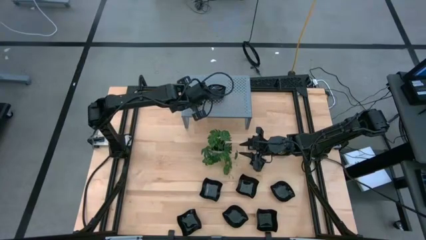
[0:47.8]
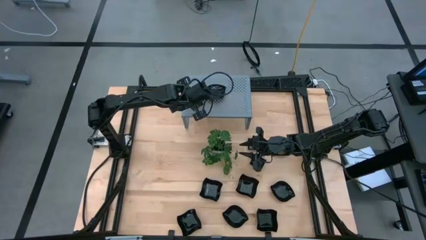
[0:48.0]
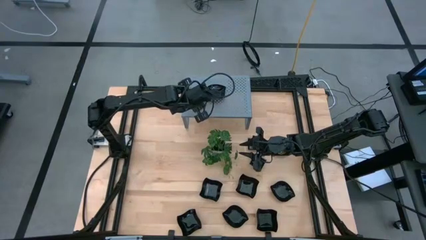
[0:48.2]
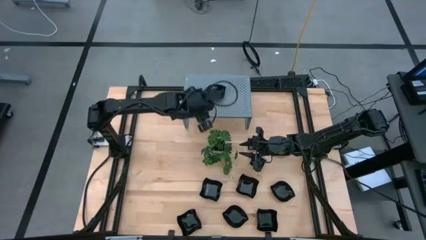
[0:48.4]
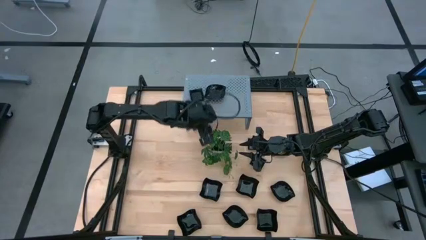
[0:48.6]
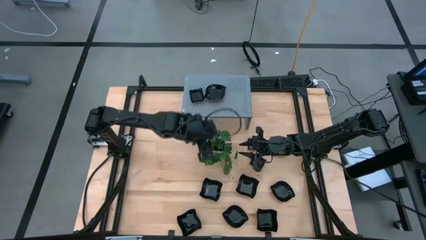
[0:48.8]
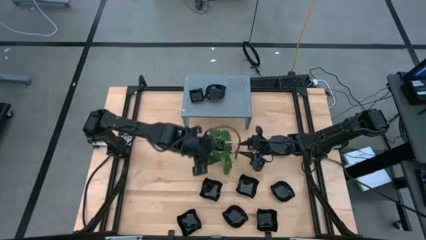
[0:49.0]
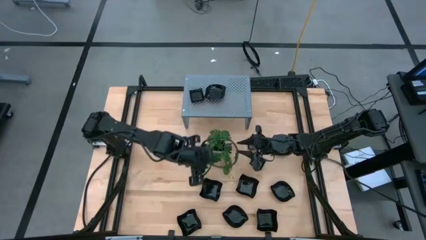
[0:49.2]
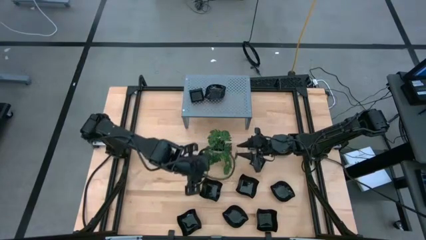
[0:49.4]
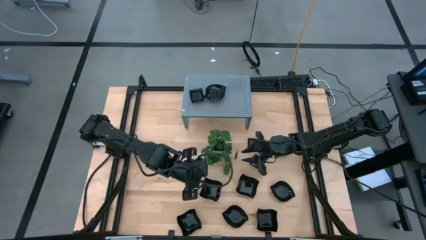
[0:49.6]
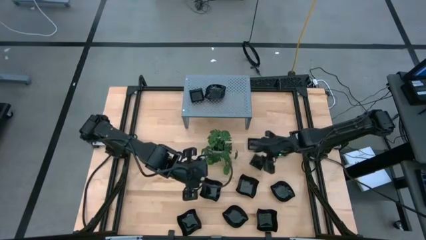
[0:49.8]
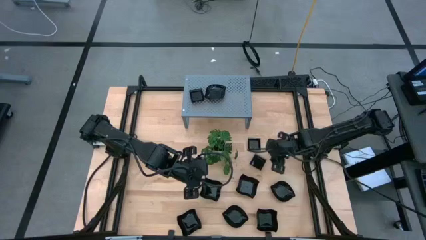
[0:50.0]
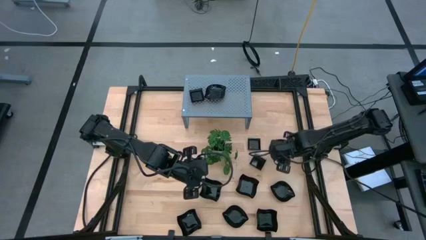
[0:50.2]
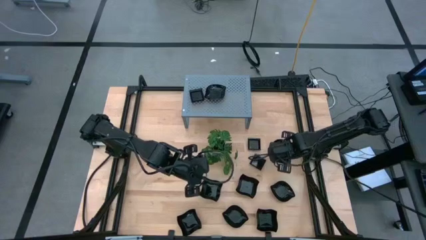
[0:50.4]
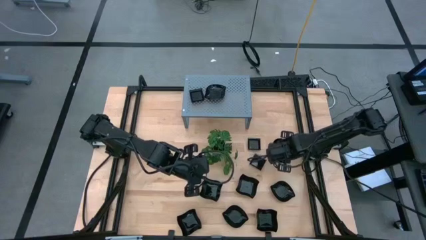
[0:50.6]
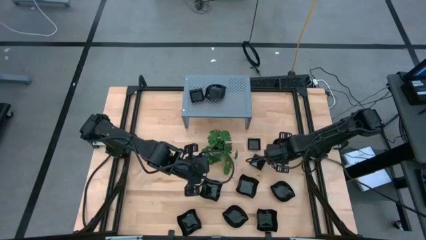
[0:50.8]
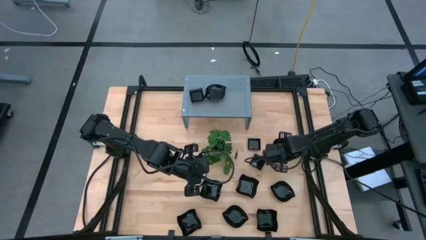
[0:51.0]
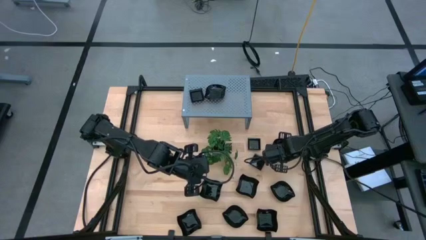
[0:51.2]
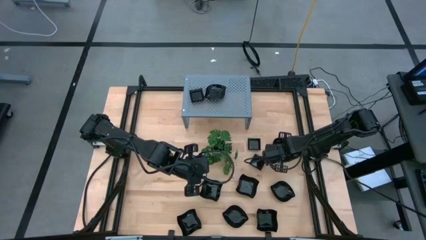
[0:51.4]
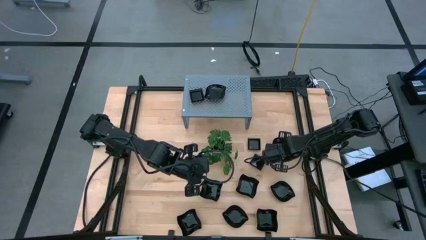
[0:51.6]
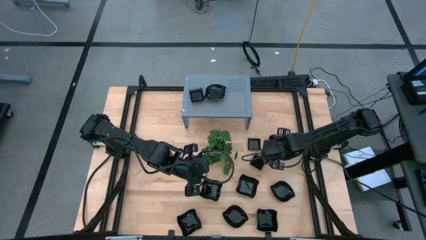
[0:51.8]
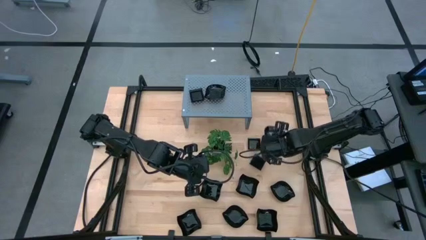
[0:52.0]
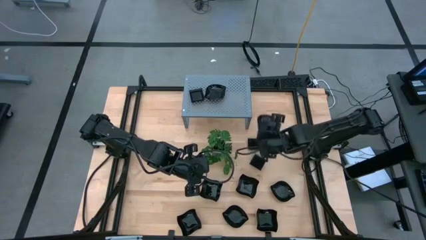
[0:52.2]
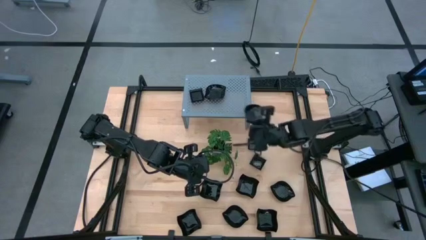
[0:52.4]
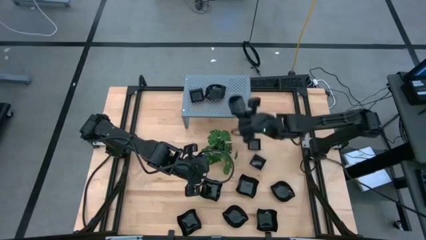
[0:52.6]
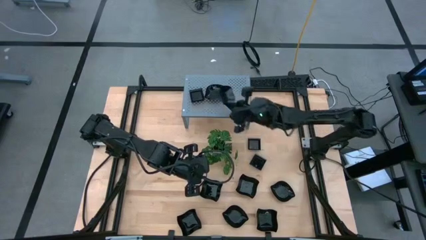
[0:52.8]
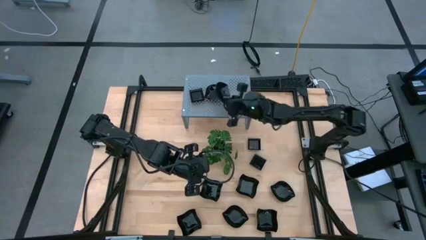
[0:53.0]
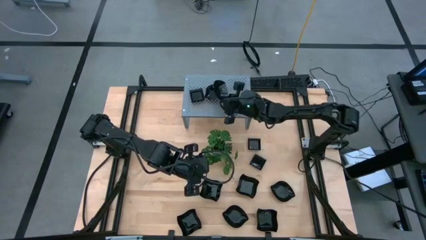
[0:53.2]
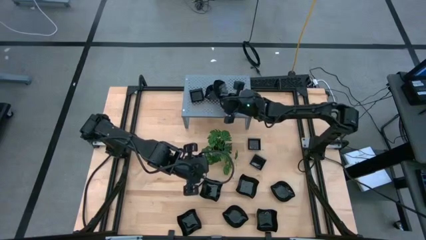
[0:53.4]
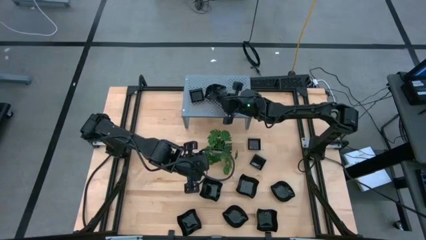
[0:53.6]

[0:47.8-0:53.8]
Task: Pick & Place Mini shaped plates
Stack the leaf shaped plate on top of the other black leaf shaped plate on the shelf

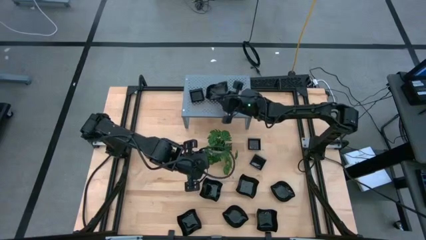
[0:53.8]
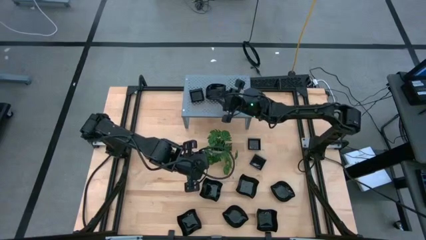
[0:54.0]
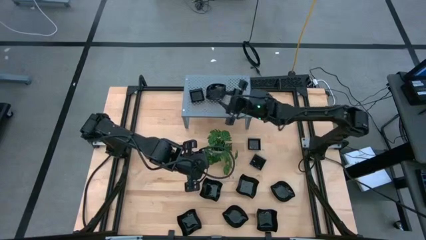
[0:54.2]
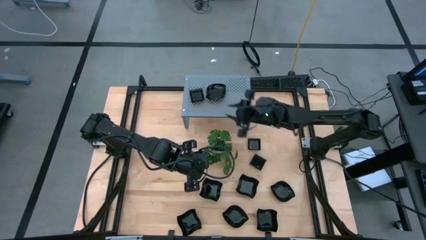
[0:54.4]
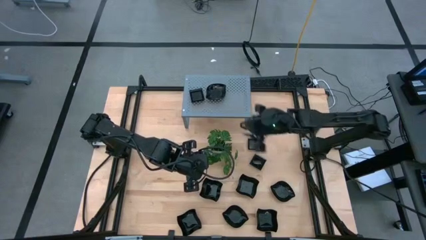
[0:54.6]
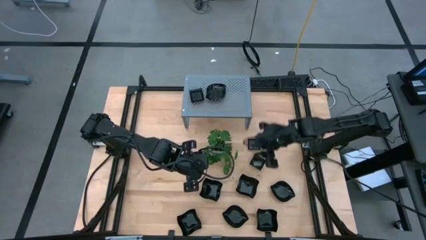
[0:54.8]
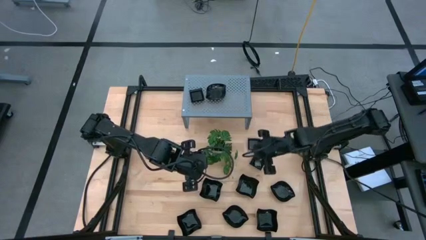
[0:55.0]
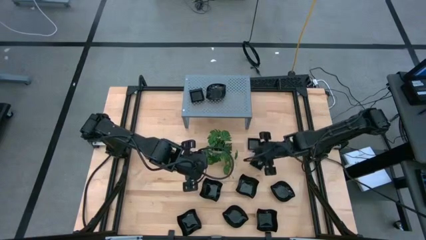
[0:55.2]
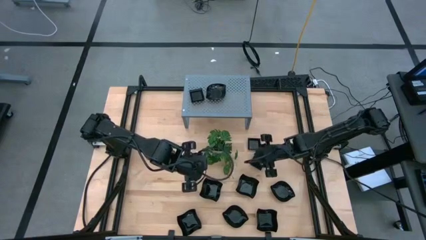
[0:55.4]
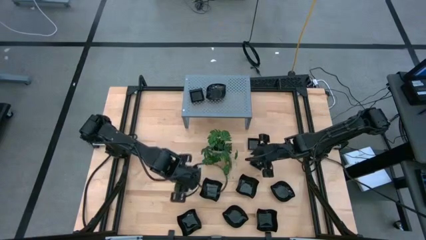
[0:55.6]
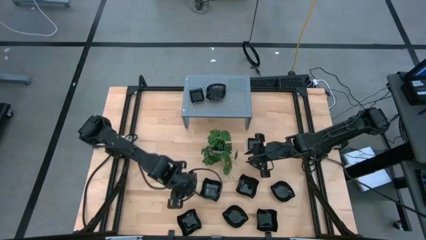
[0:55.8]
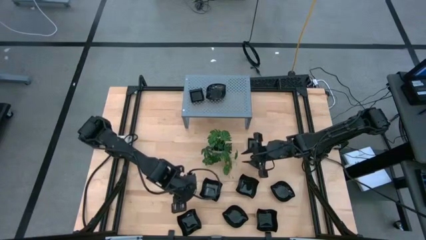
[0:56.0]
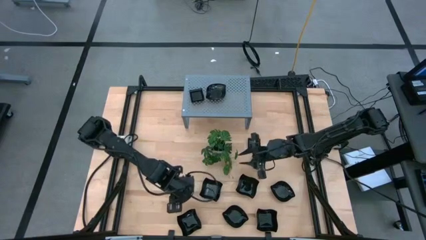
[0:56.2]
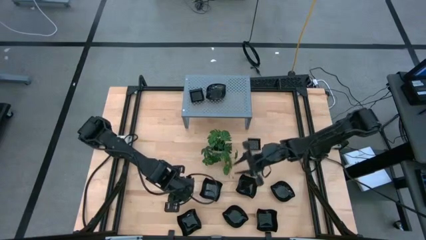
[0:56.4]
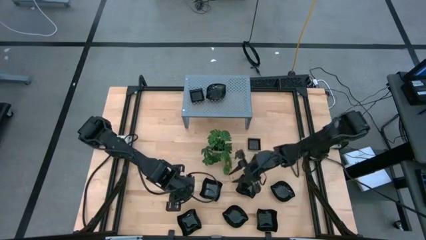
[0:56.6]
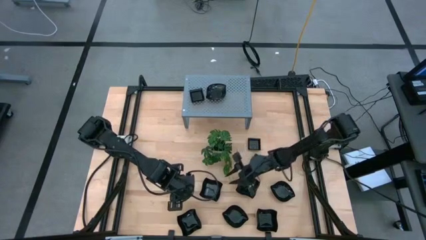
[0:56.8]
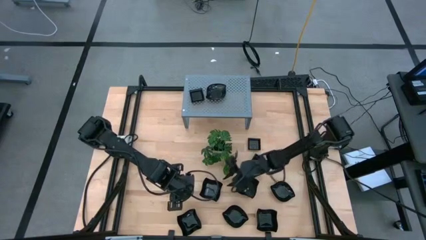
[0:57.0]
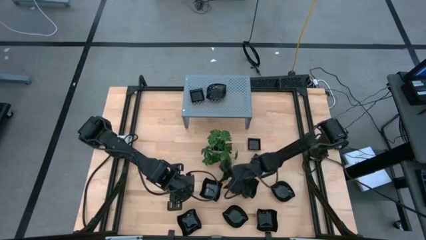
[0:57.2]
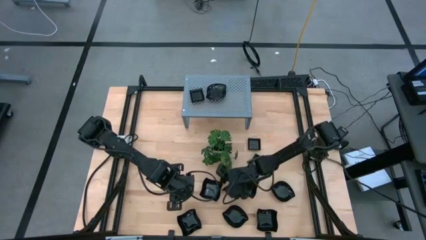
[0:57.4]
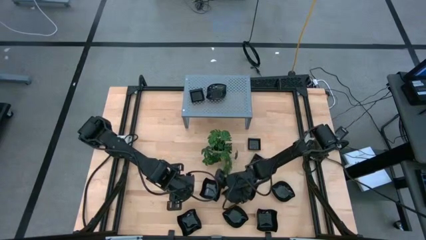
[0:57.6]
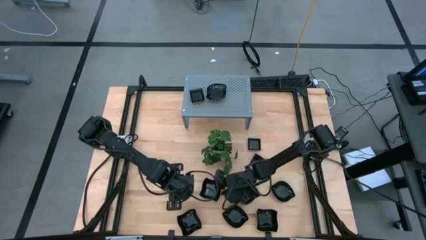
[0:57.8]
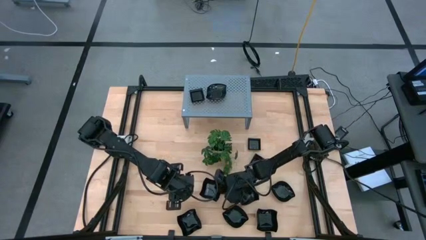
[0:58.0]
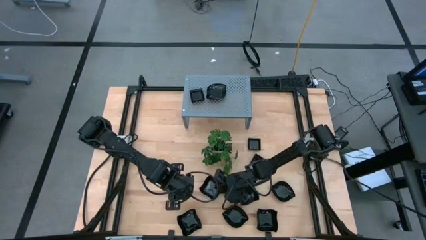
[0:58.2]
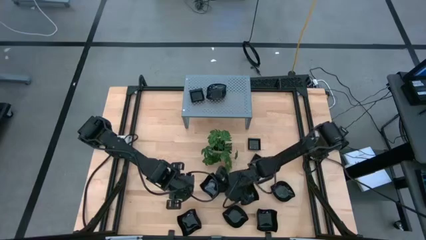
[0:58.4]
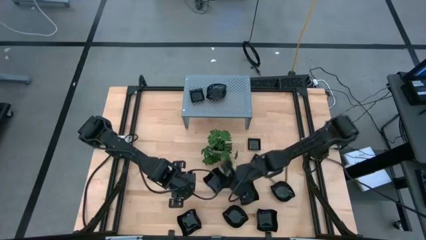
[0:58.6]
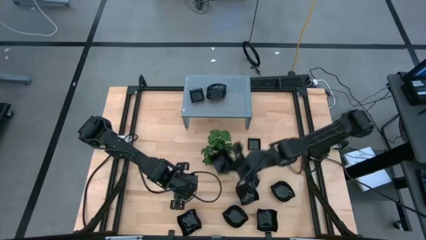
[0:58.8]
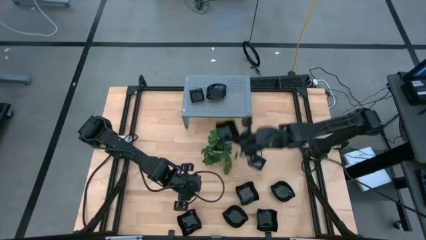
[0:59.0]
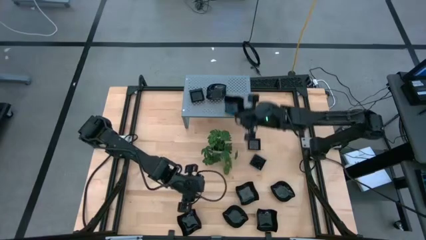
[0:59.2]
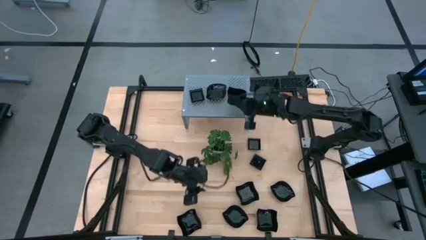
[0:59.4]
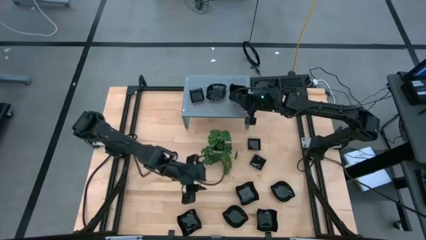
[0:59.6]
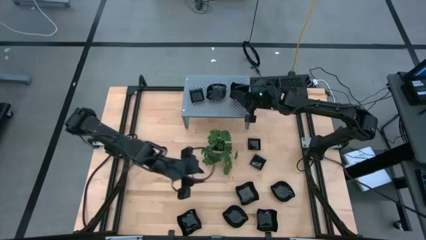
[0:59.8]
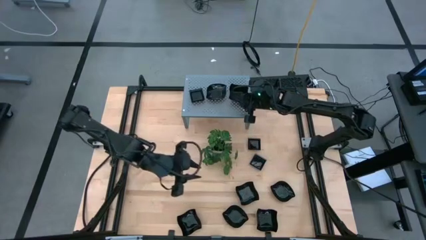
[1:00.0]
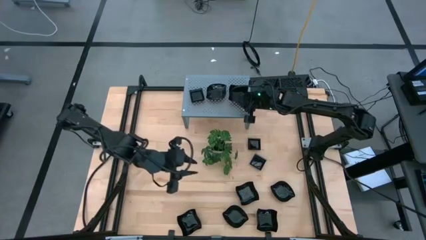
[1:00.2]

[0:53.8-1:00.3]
Put the black distorted square shaped plate on the shelf

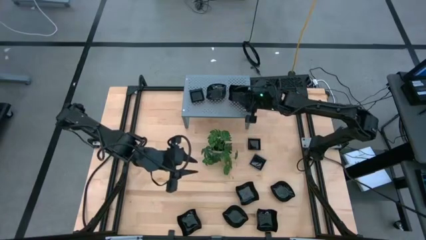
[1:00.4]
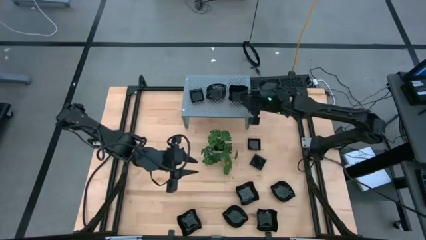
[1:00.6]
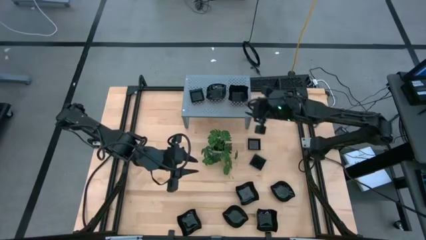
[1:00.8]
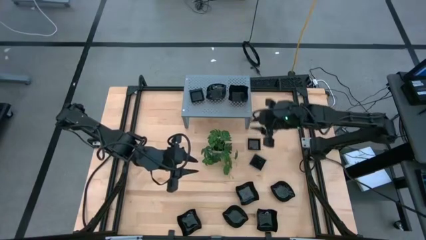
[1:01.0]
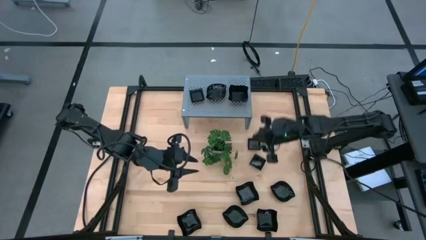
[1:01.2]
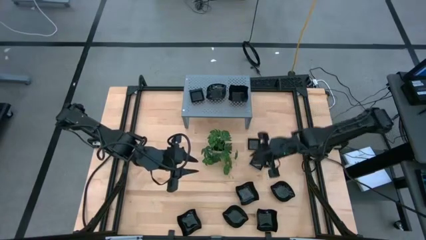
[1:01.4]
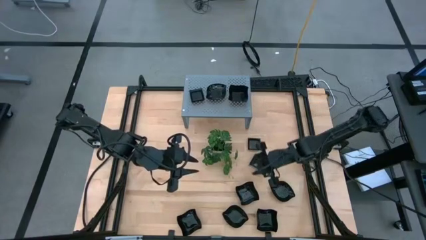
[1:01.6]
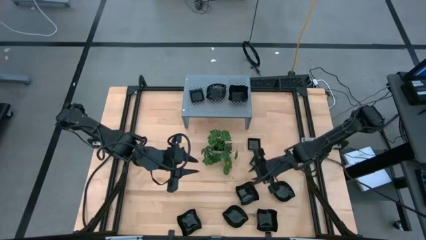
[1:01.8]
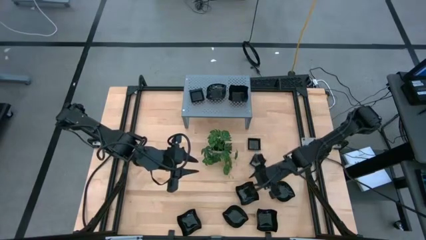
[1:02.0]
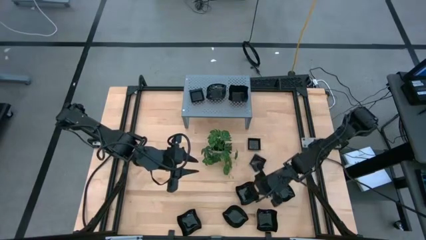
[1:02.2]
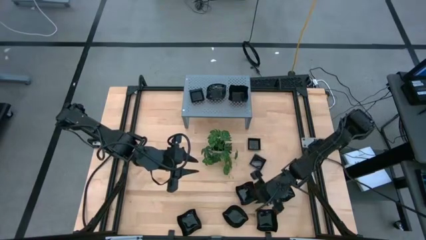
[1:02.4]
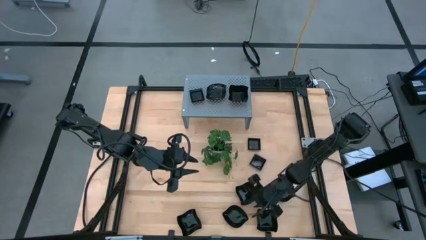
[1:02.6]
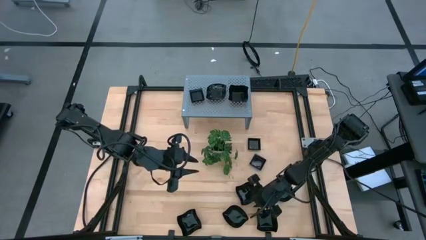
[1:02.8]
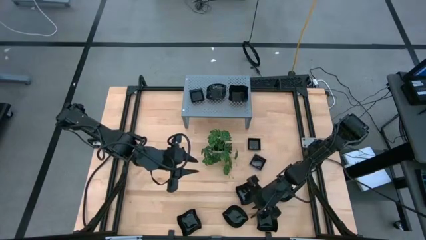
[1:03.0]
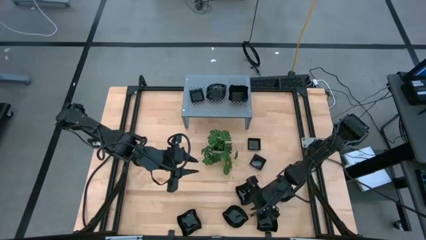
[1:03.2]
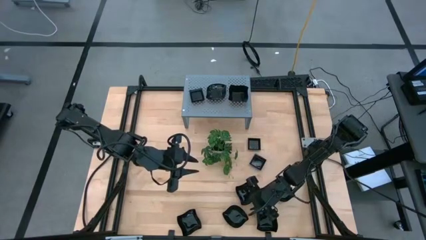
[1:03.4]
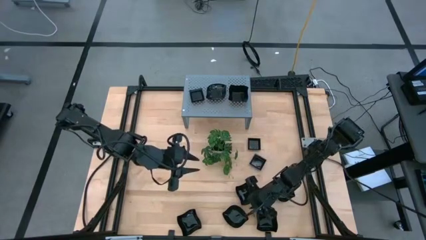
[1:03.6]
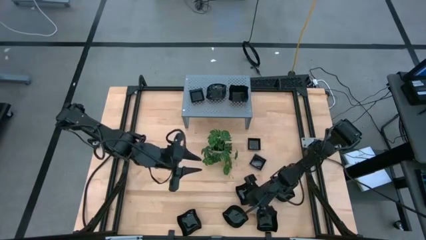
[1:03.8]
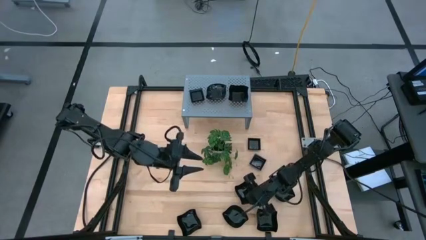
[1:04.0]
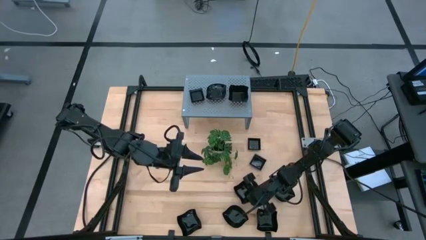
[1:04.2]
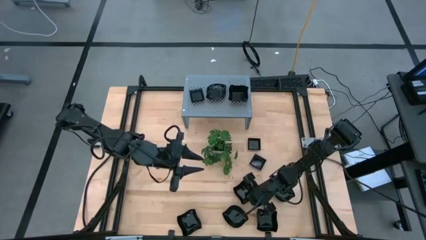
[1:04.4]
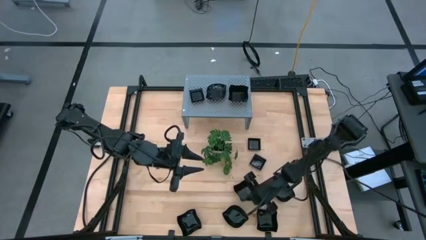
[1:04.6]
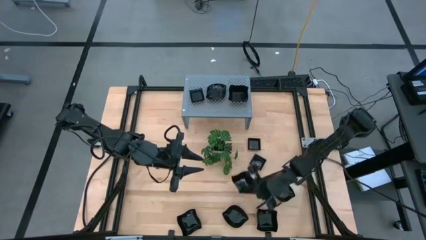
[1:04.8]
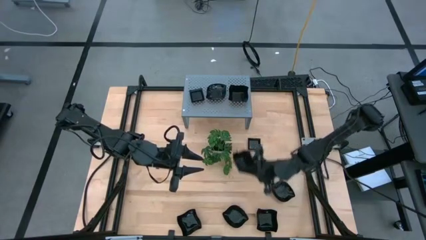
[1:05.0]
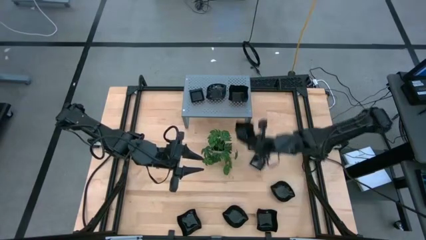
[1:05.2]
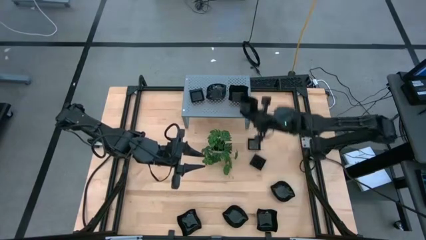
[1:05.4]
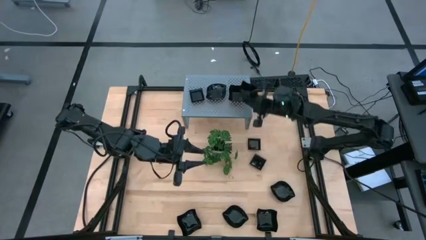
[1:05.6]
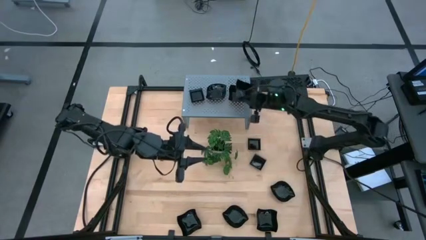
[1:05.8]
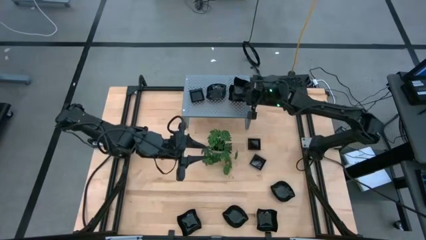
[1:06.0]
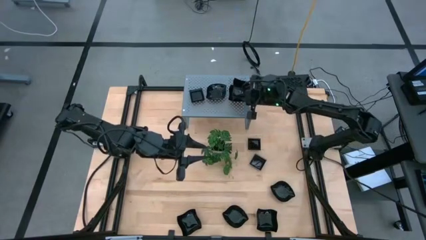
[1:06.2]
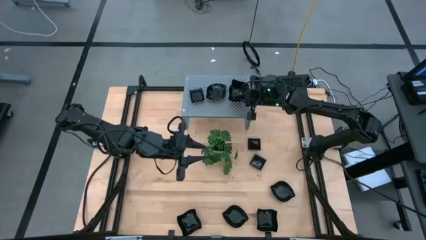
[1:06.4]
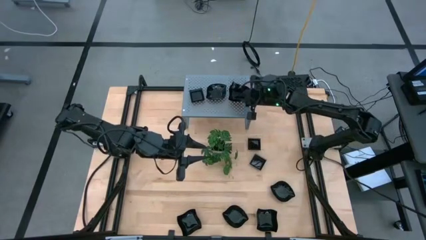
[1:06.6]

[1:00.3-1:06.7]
Stack the black distorted square shaped plate on top of the other black distorted square shaped plate on the shelf
